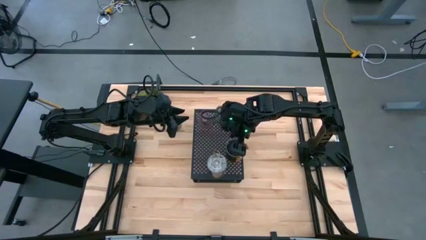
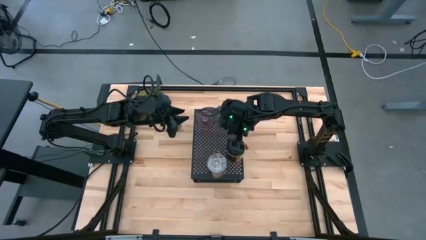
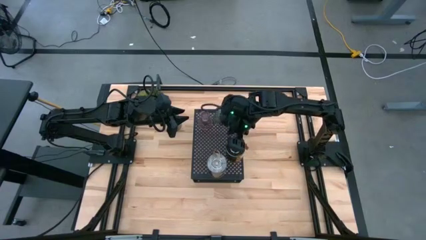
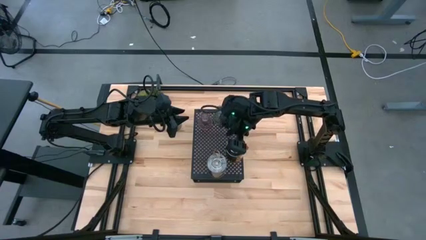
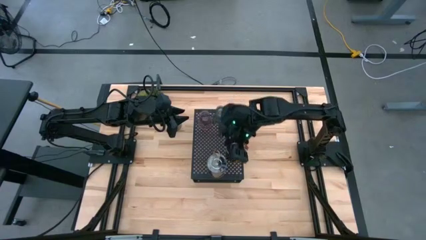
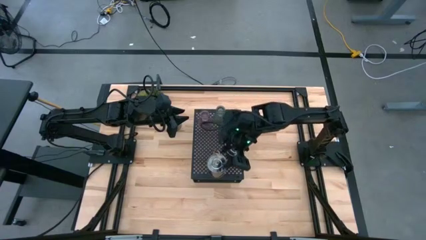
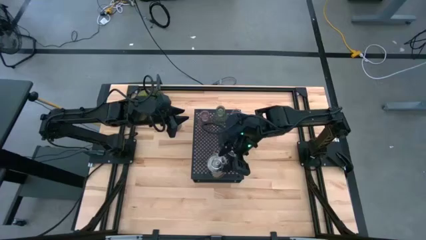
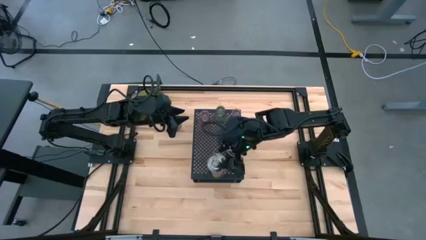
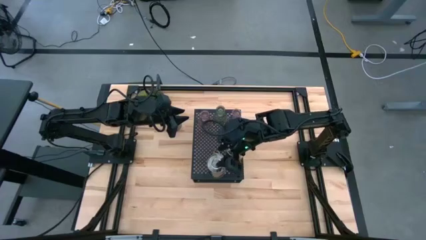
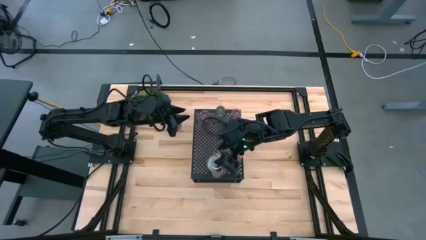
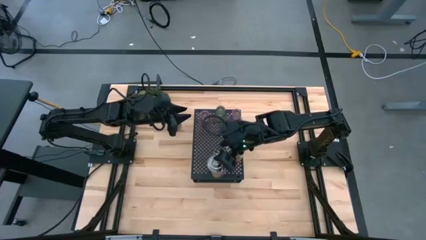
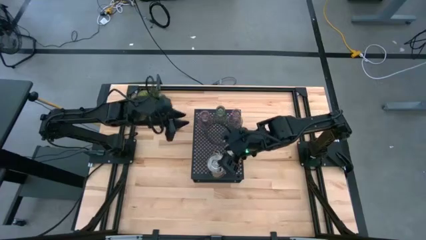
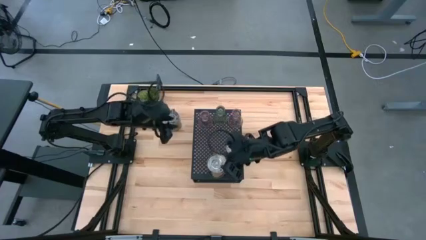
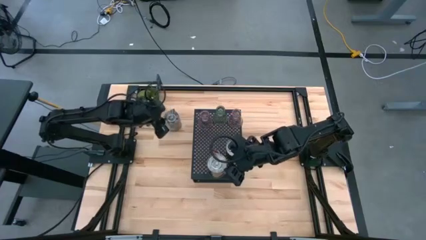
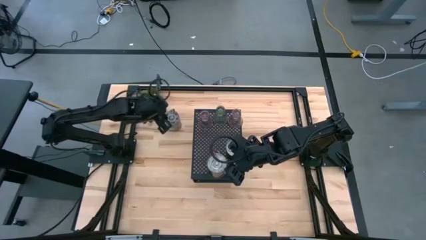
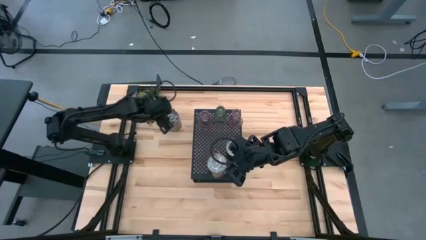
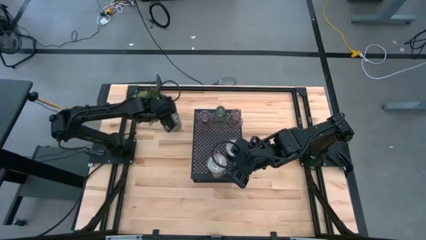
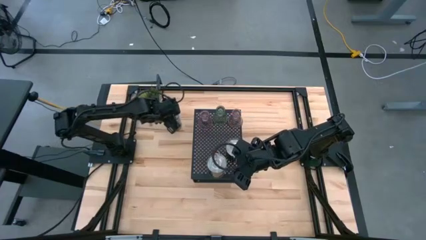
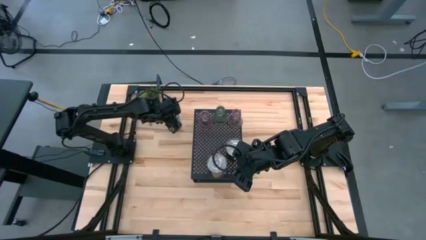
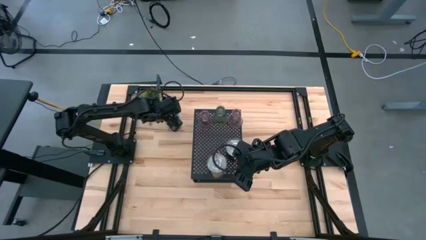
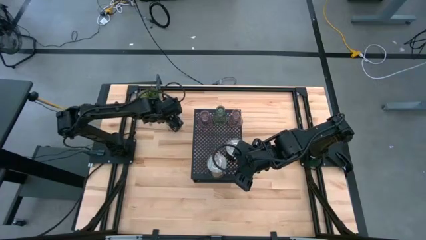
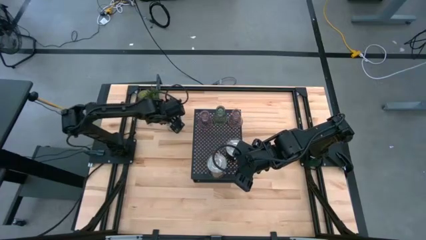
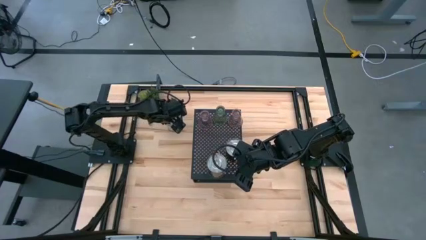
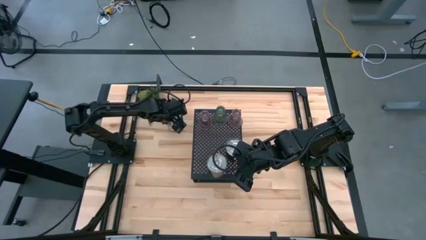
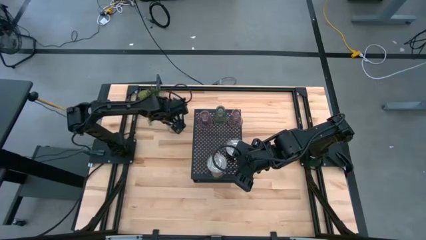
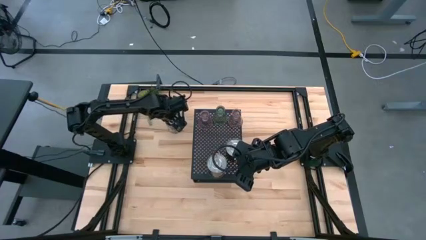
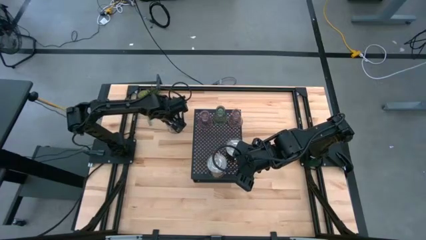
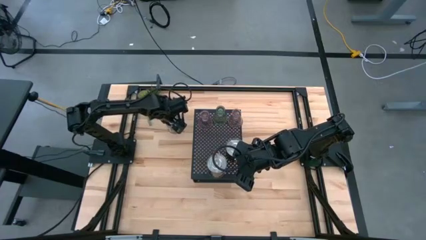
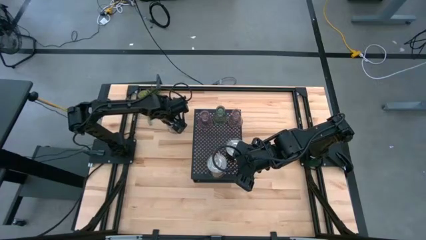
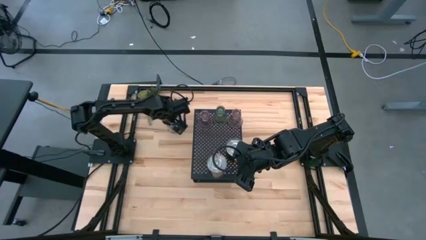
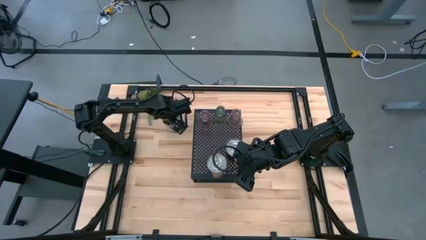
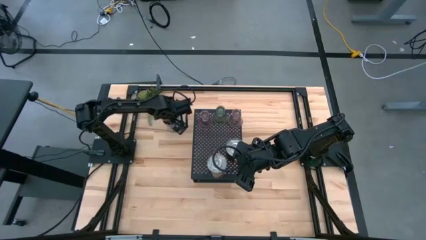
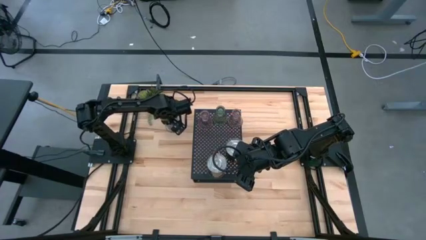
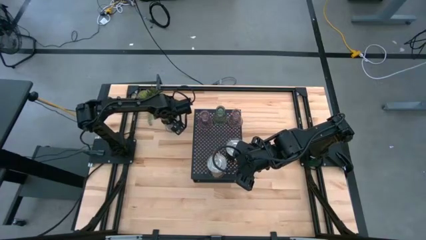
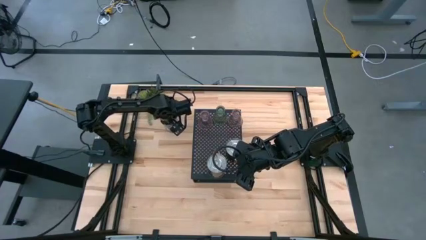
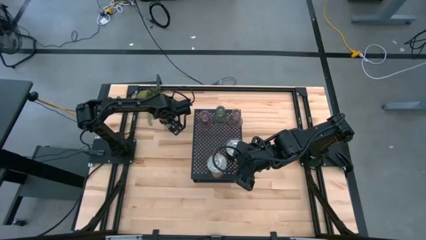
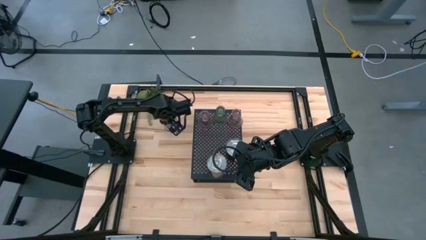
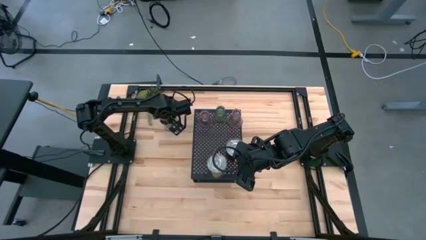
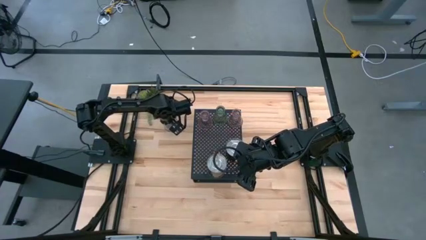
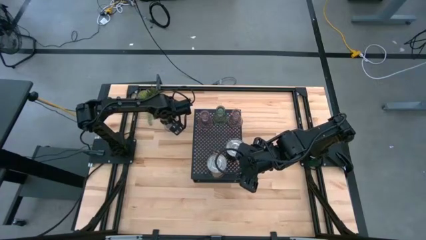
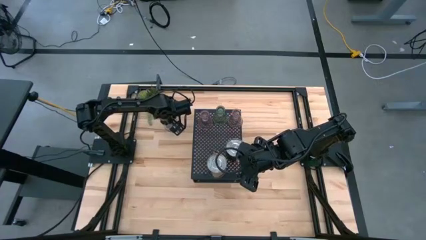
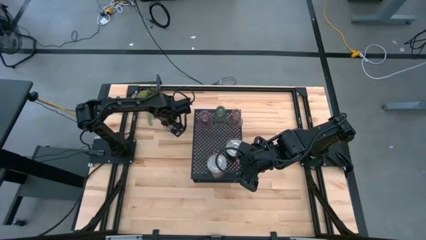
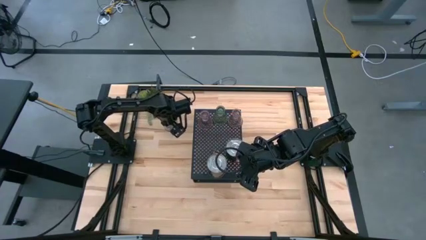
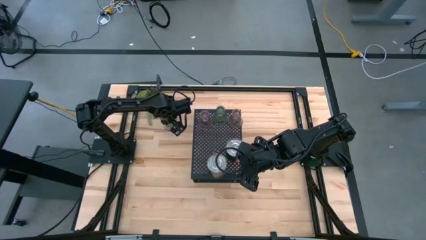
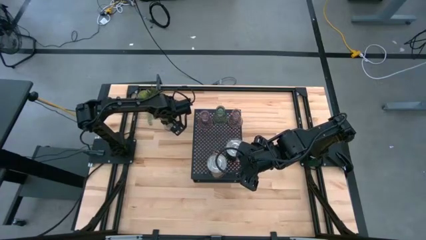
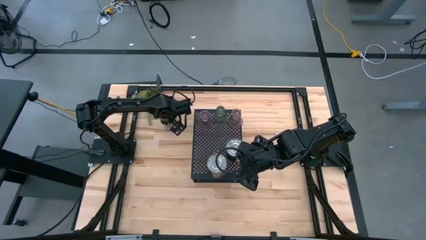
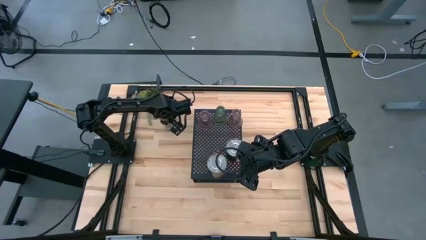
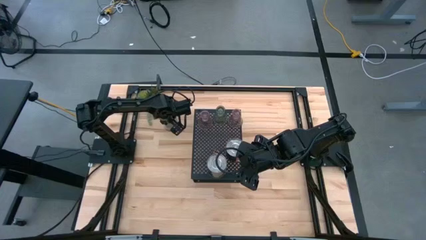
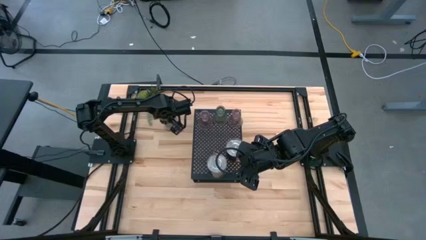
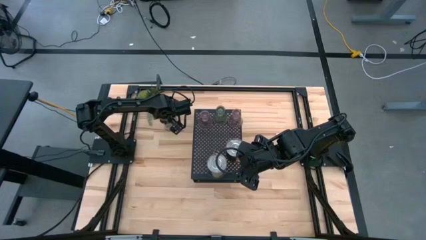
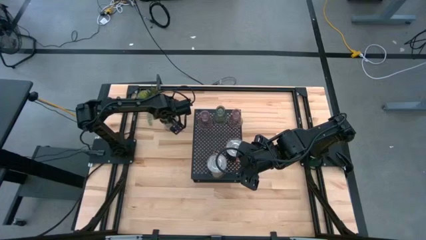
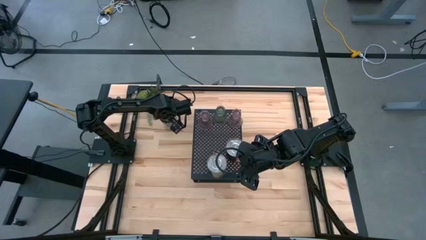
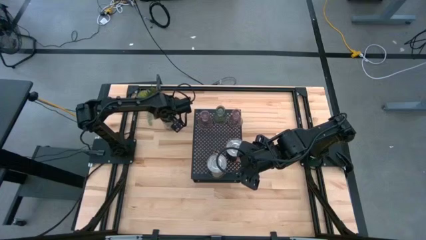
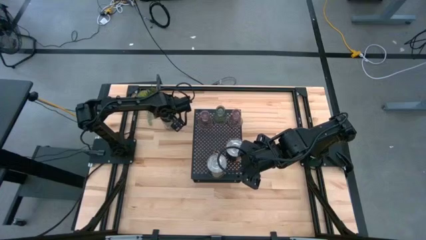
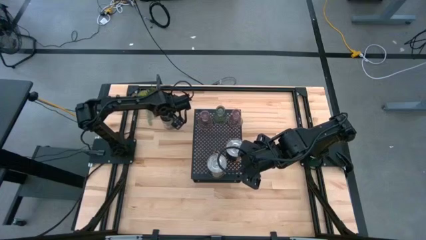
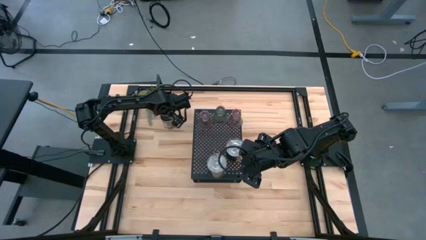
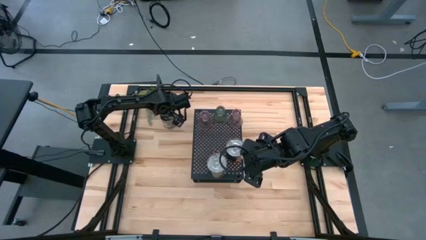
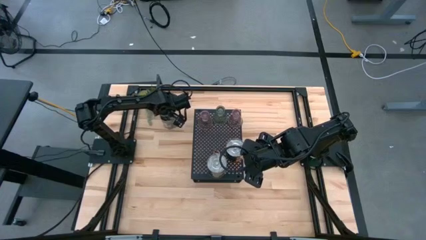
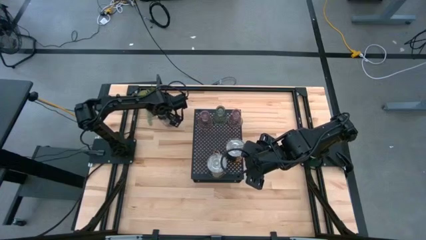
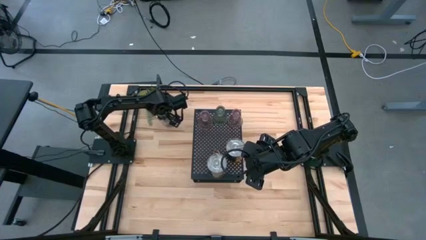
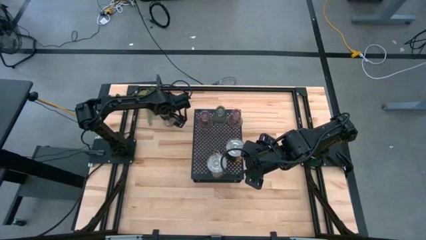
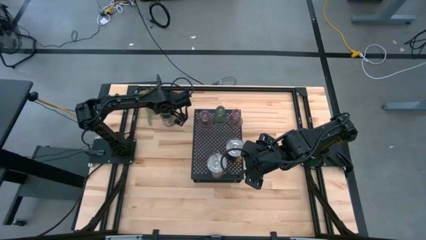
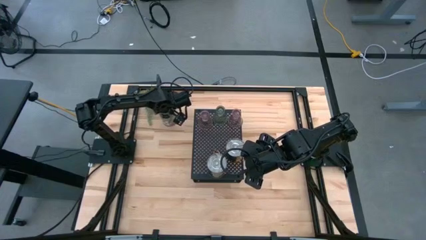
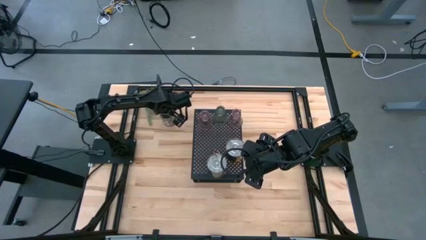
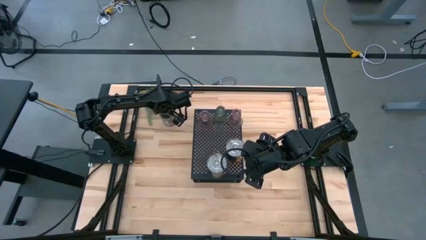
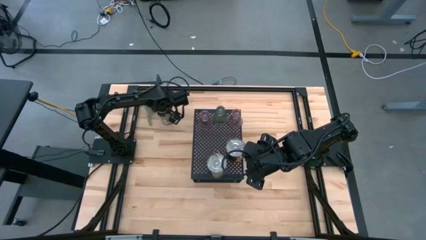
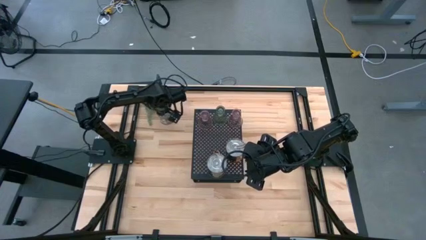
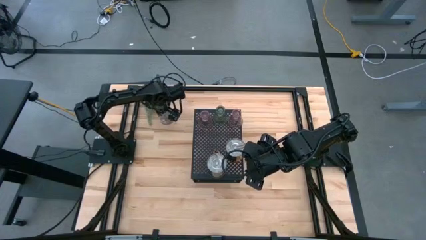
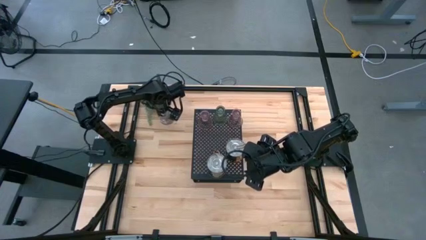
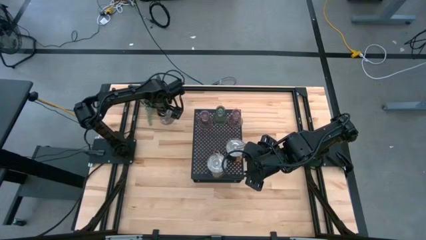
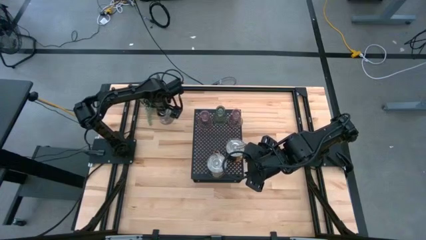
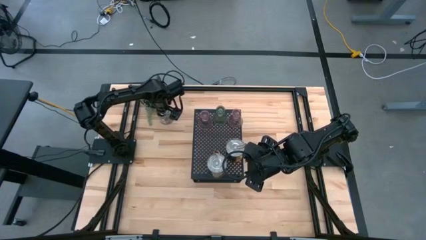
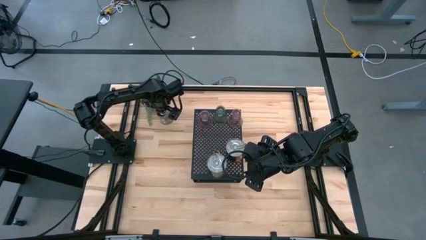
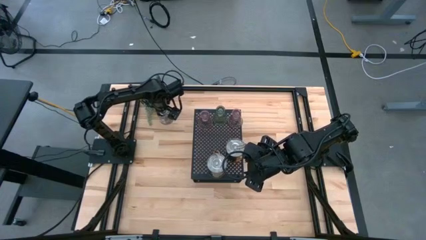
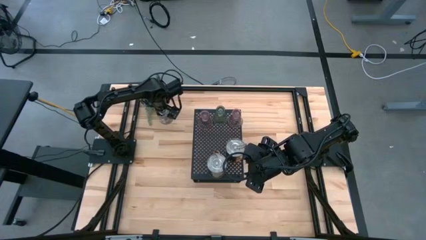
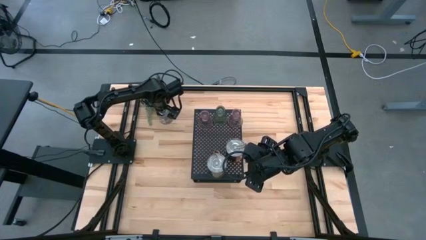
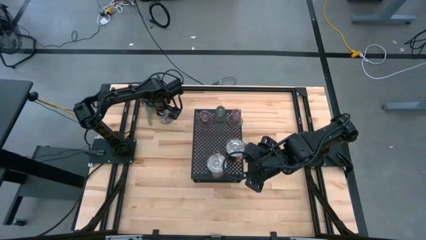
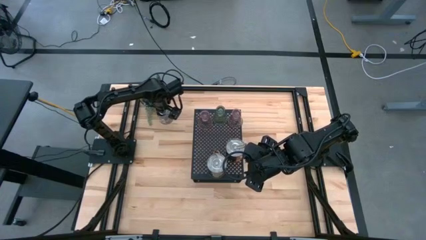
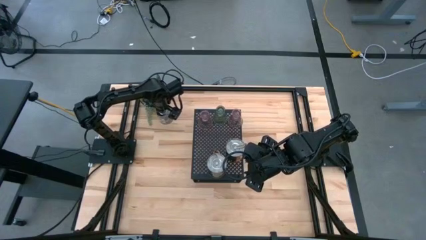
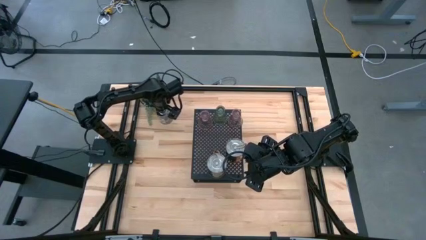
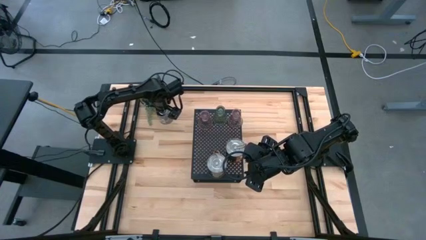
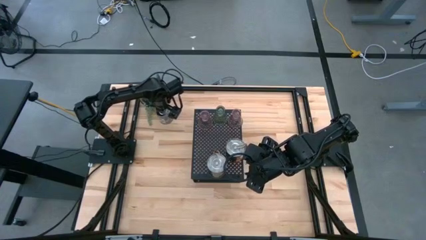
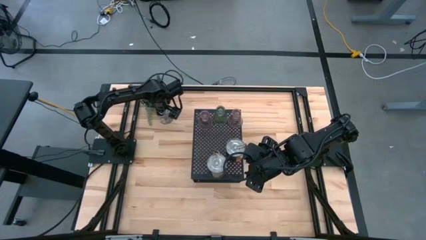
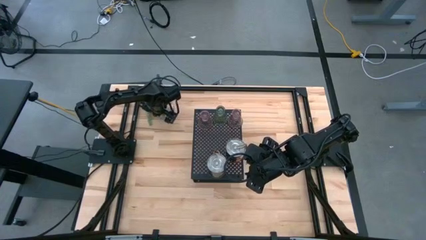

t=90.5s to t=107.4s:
Task: Pick & Place candle stick holders
Put the brown scented candle on the shelf
